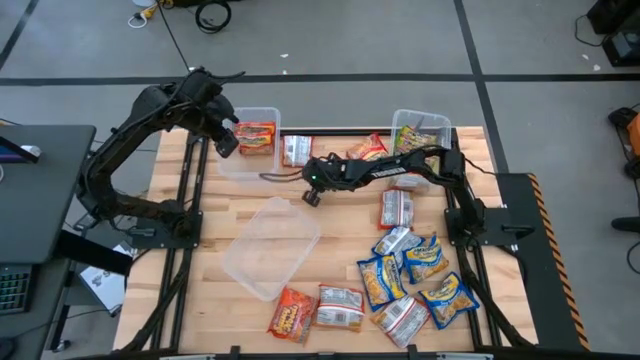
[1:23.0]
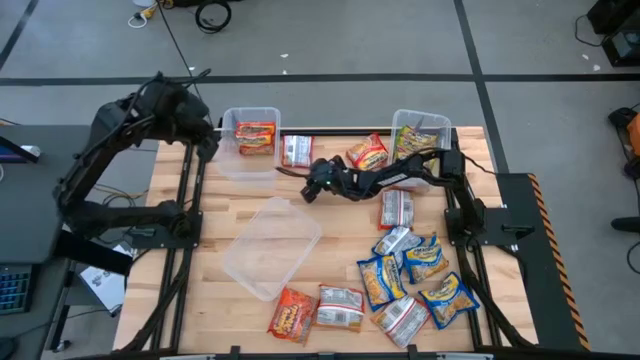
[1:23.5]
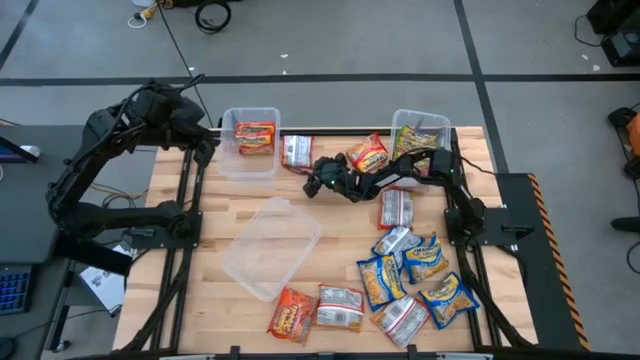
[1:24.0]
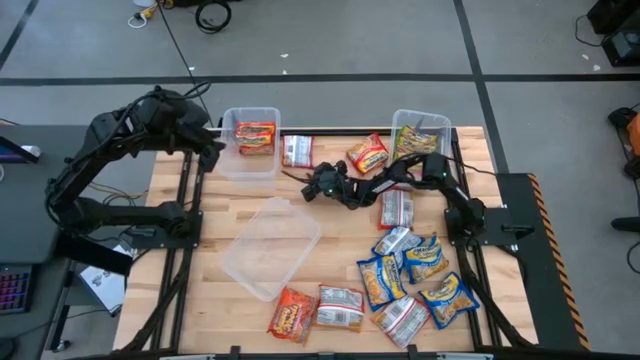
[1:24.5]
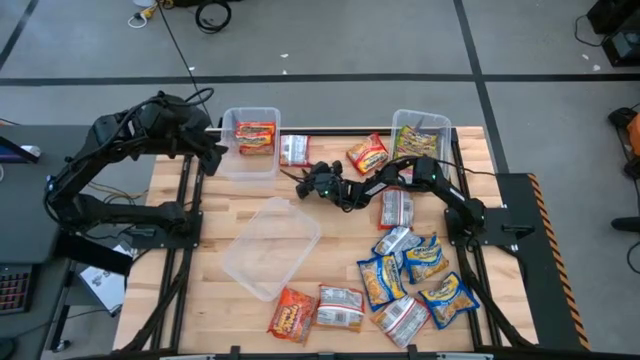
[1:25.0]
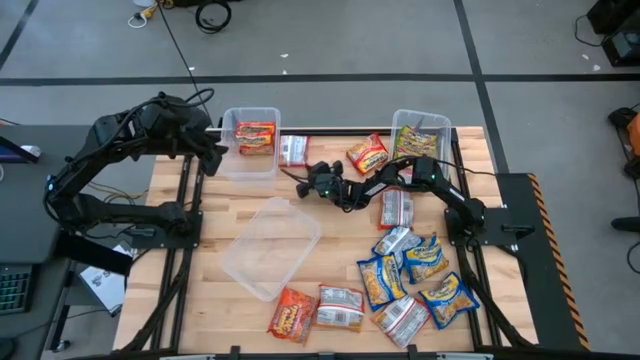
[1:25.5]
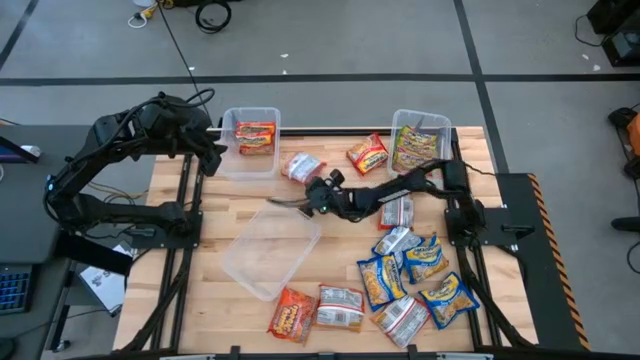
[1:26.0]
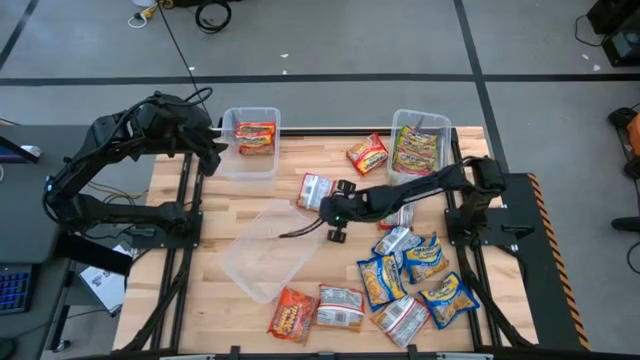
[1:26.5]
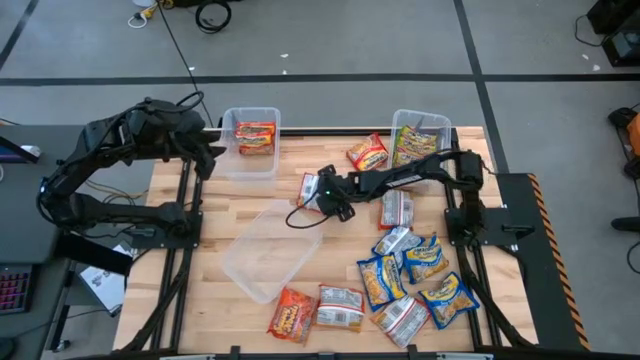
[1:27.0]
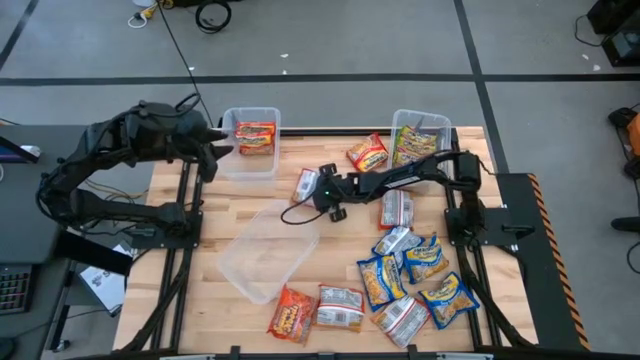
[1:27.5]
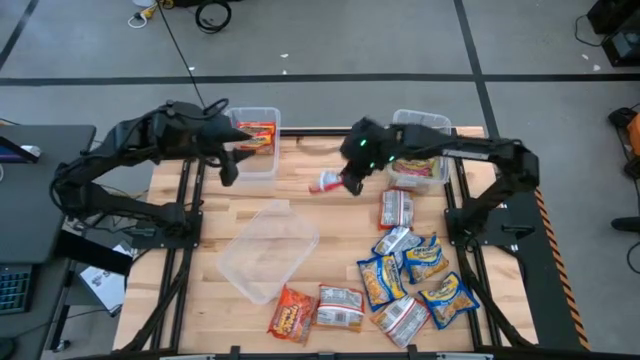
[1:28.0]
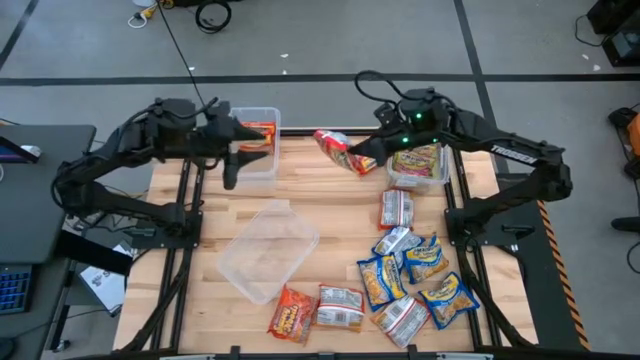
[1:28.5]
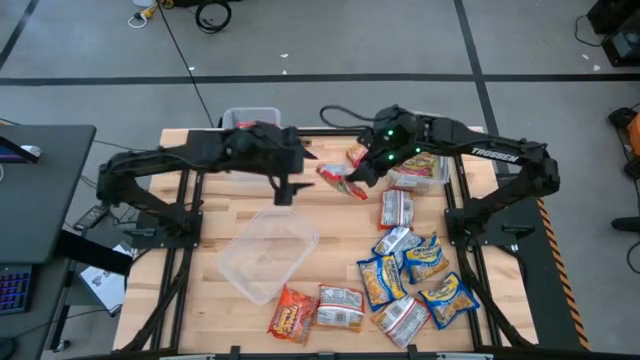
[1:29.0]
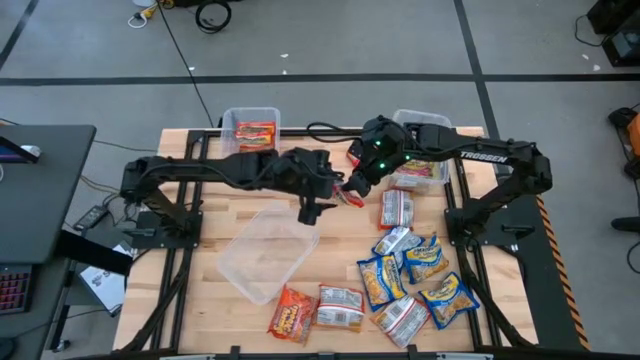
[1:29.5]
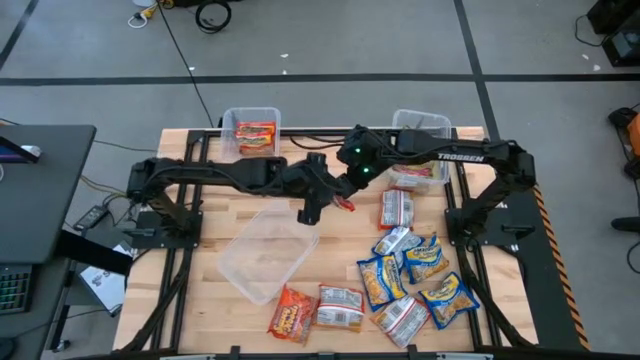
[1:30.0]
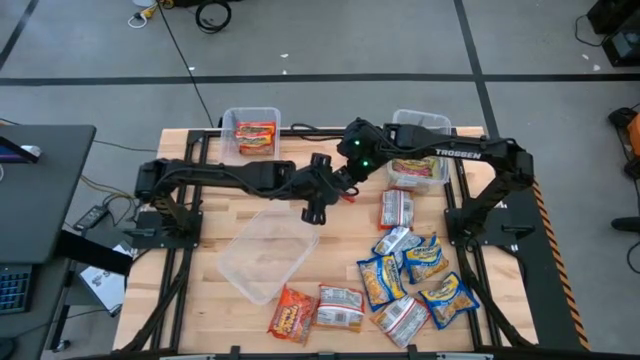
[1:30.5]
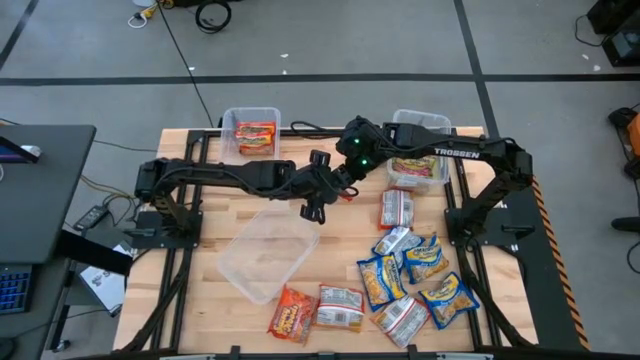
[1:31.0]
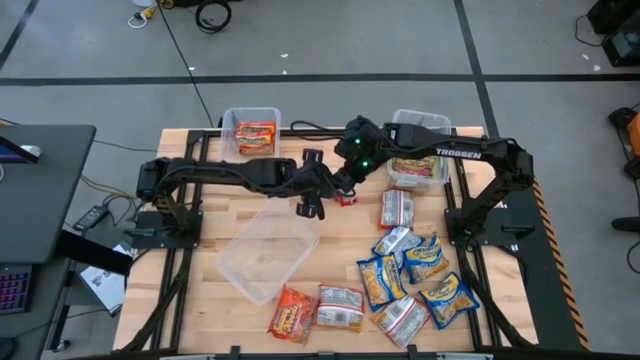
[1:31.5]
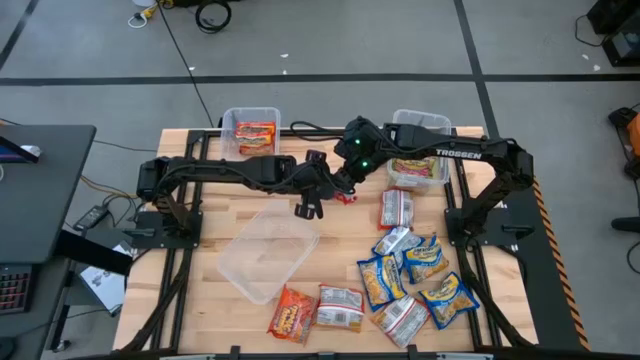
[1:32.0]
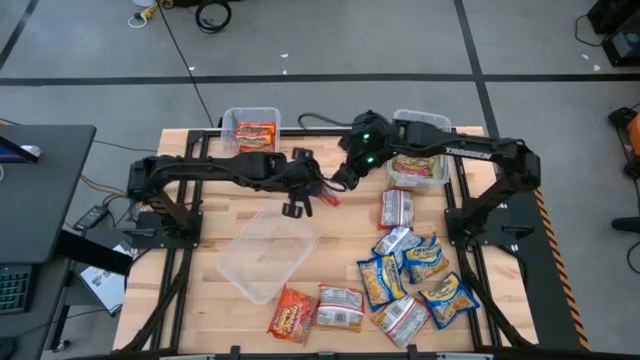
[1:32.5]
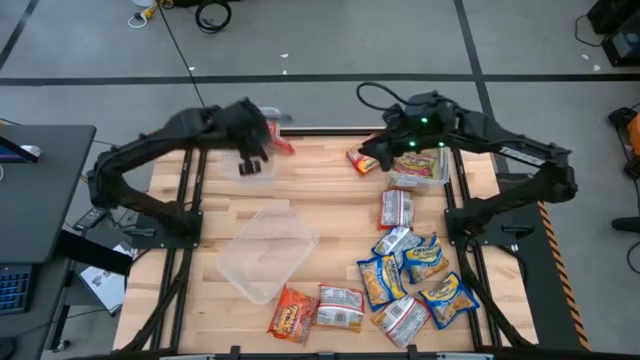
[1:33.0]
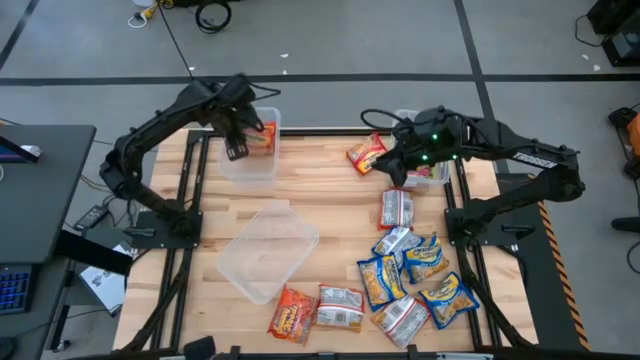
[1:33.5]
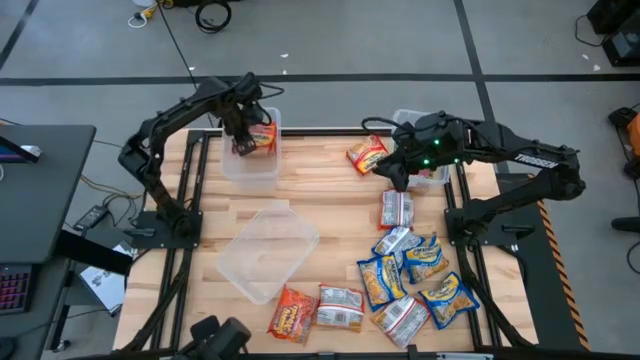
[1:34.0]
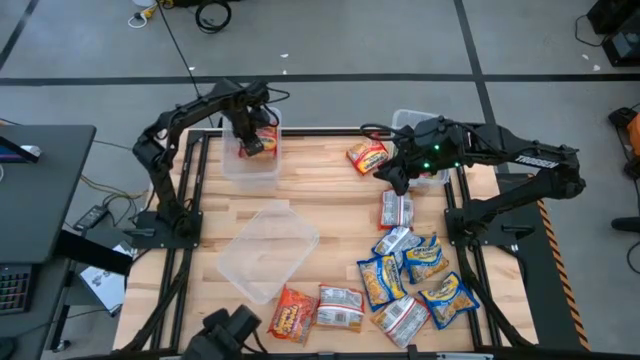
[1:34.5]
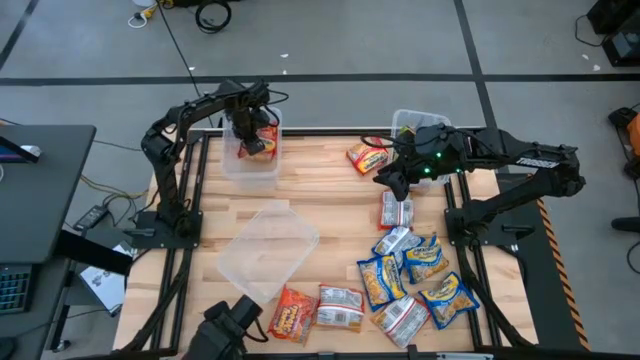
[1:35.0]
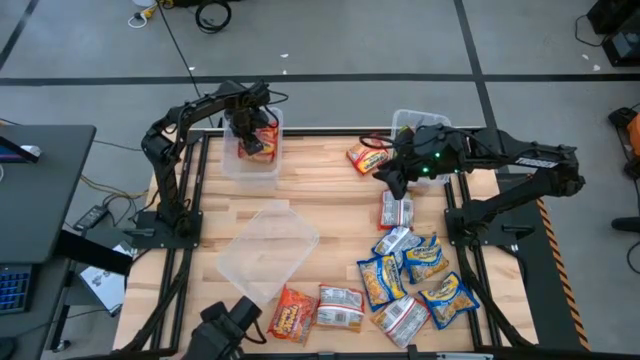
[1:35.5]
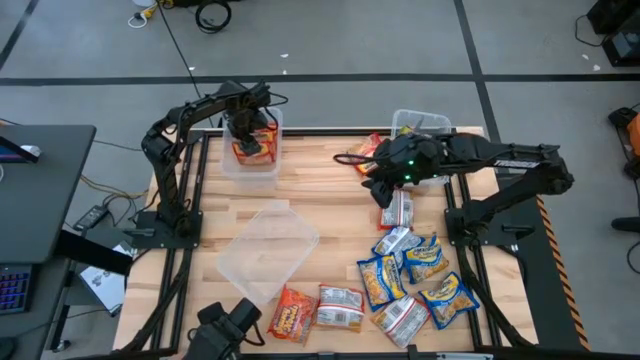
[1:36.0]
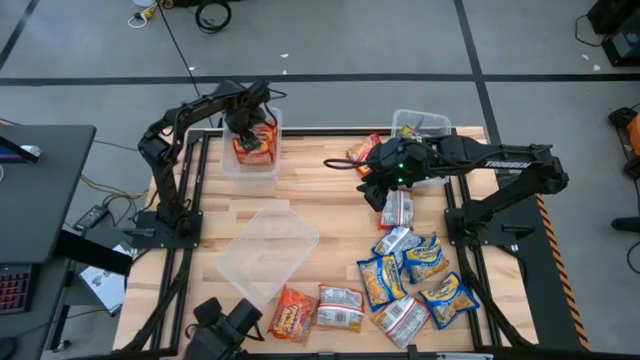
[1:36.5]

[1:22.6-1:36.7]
Task: Sort Maruchan noodles
Put the orange noodle pack into the top left transparent bin

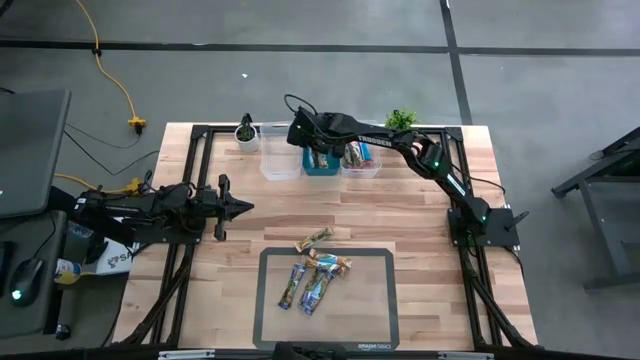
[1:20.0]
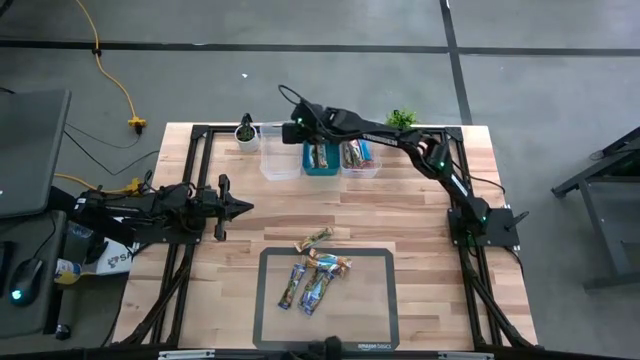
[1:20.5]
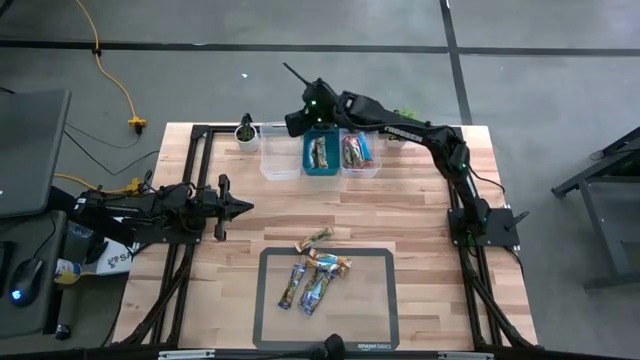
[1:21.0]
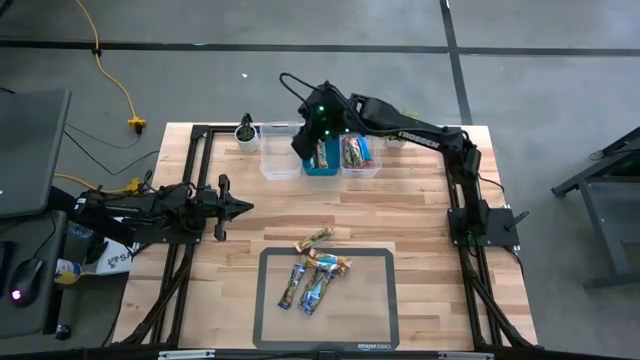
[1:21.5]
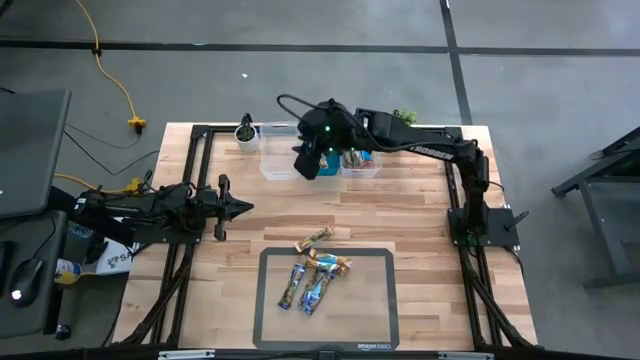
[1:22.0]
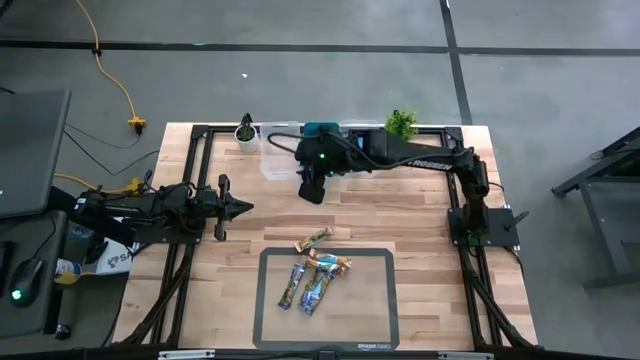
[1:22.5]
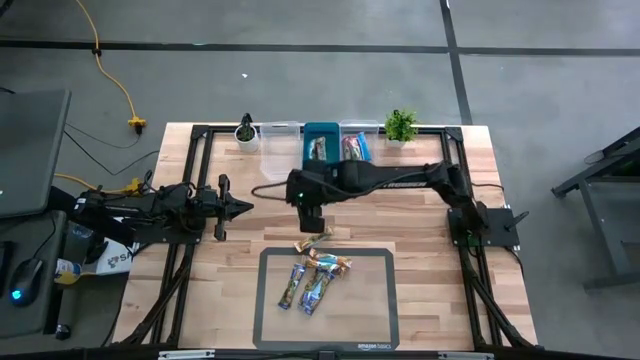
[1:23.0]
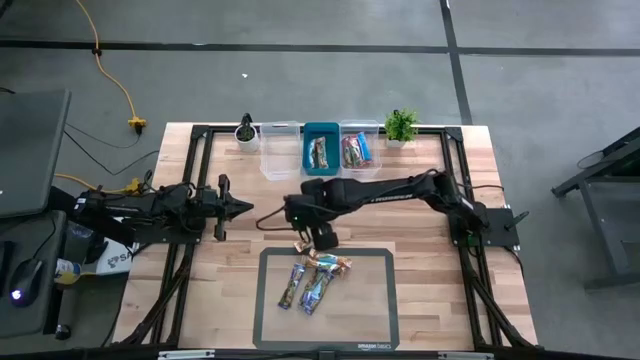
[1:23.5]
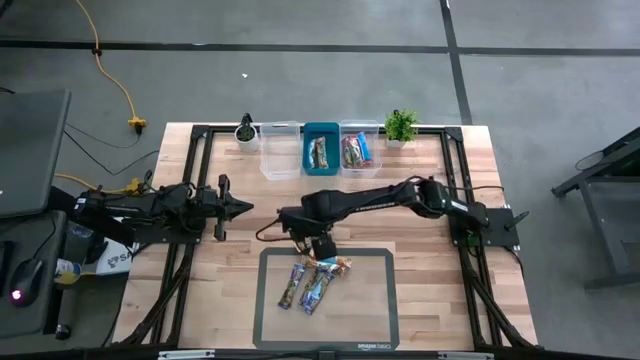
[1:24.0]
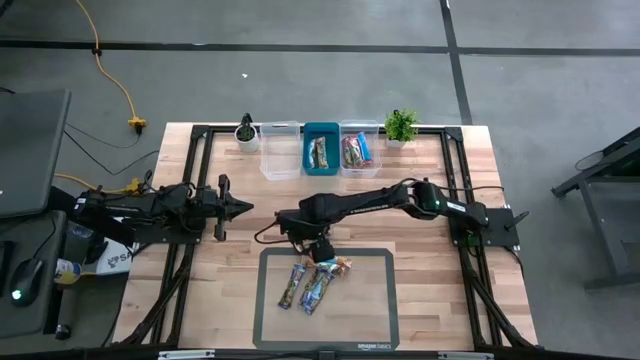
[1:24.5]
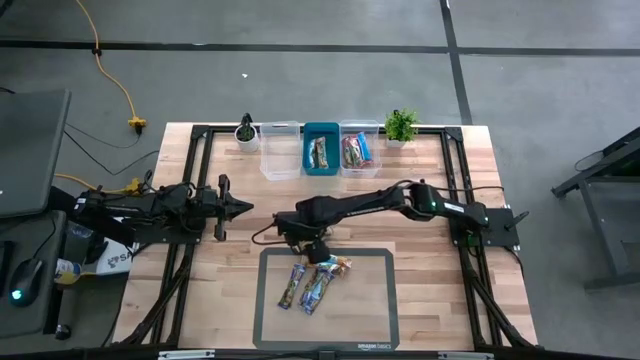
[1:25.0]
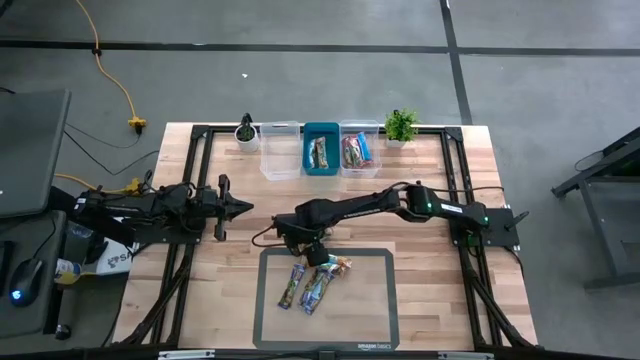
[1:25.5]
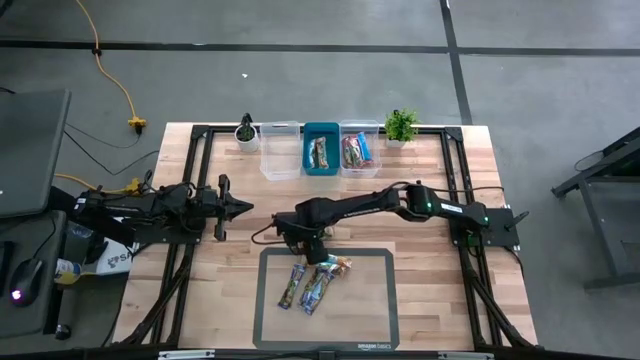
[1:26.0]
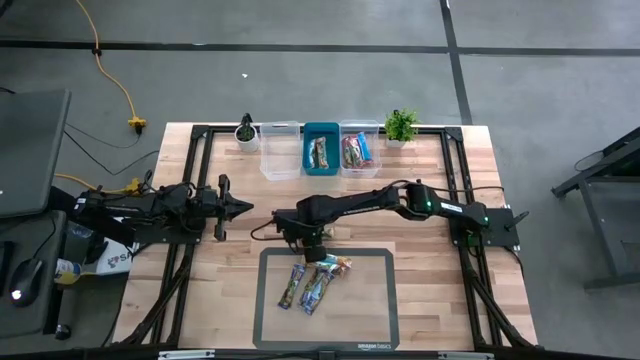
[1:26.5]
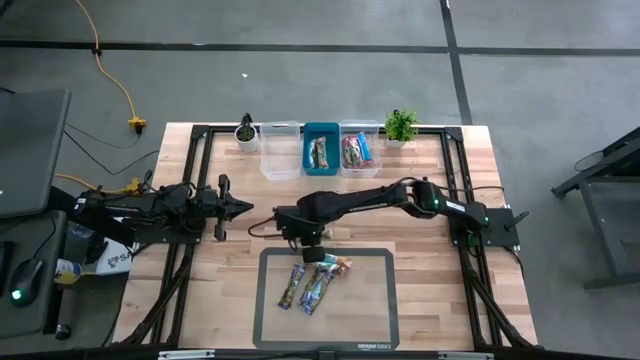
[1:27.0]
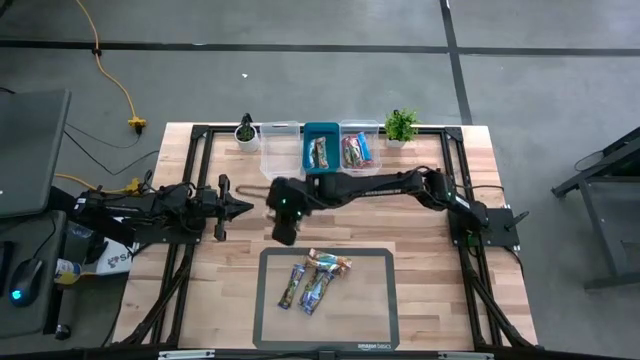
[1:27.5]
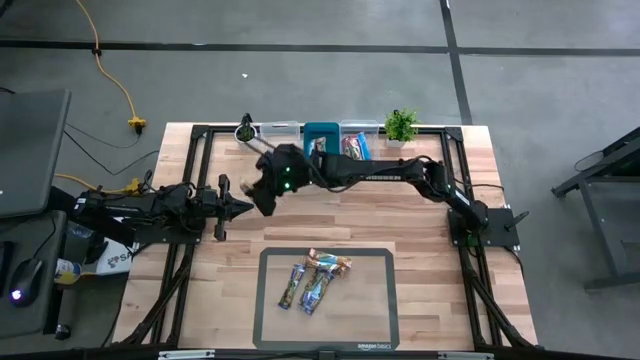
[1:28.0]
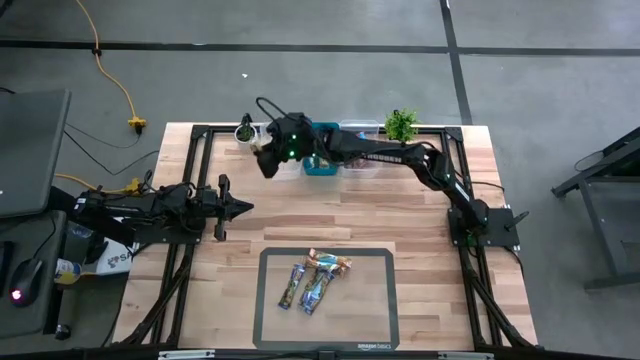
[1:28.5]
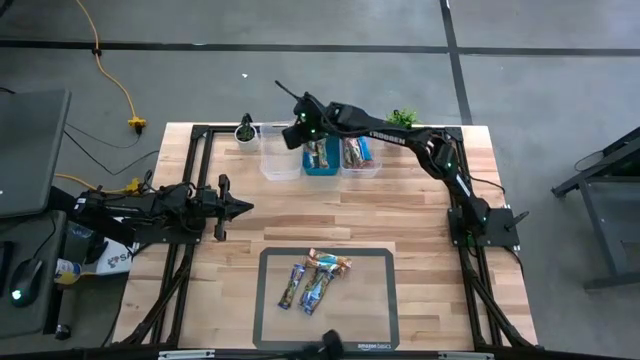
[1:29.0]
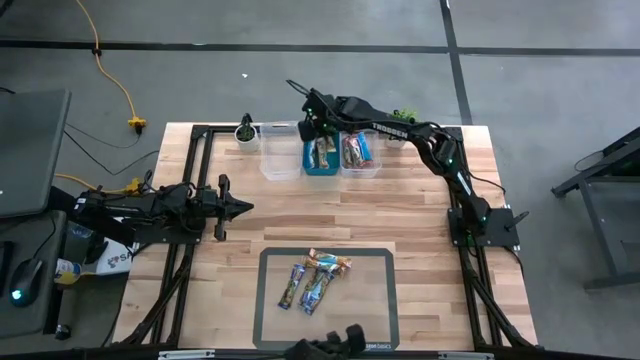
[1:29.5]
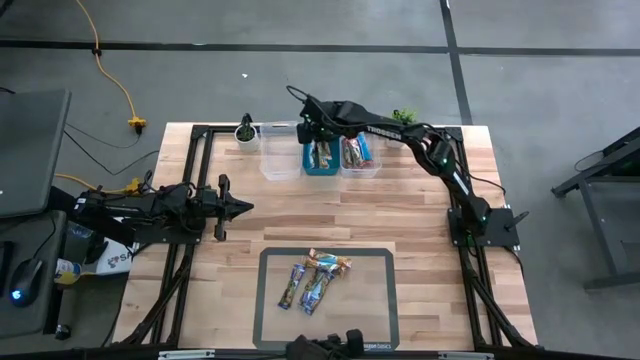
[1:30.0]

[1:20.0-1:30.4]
Task: Pick and place Granola Bars by type
Put the yellow granola bar into the blue bin
